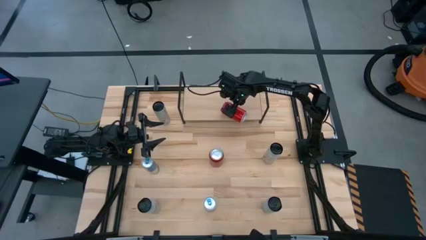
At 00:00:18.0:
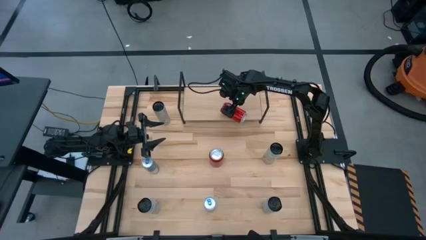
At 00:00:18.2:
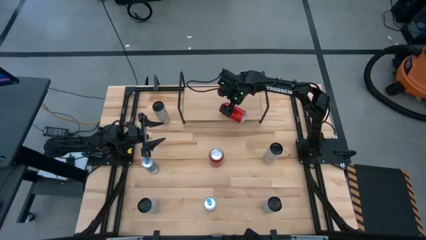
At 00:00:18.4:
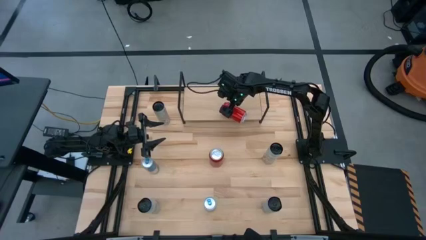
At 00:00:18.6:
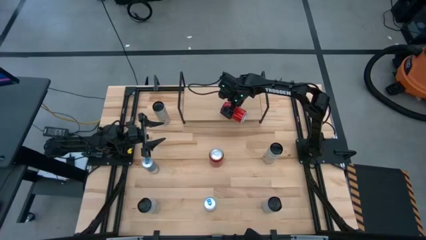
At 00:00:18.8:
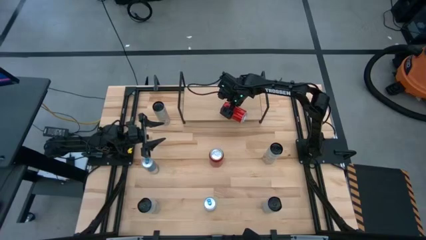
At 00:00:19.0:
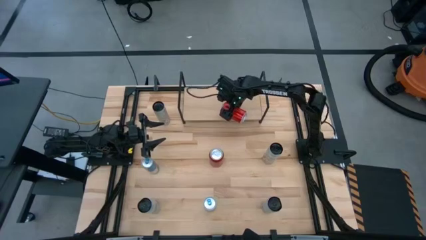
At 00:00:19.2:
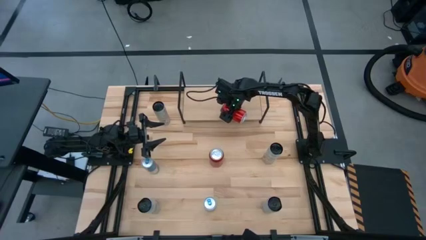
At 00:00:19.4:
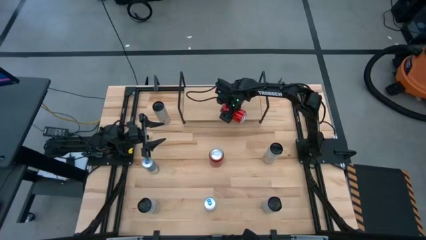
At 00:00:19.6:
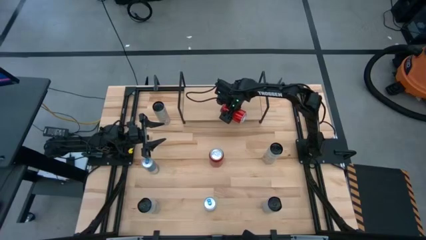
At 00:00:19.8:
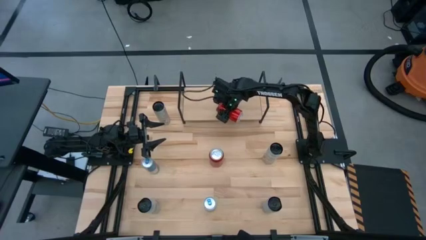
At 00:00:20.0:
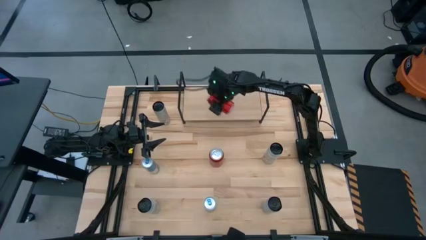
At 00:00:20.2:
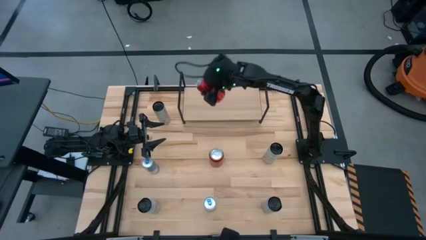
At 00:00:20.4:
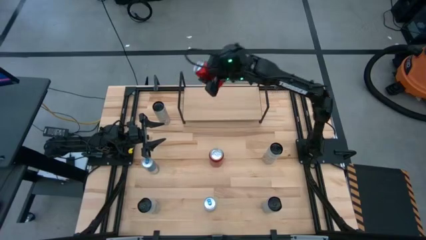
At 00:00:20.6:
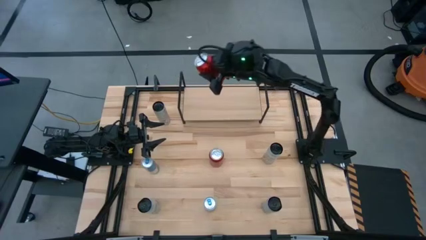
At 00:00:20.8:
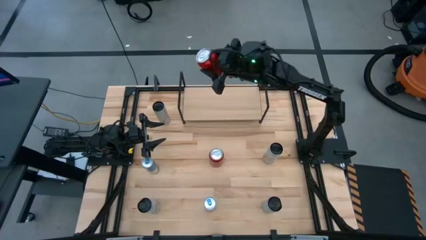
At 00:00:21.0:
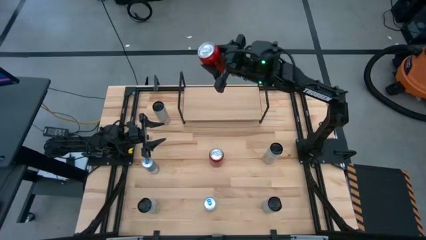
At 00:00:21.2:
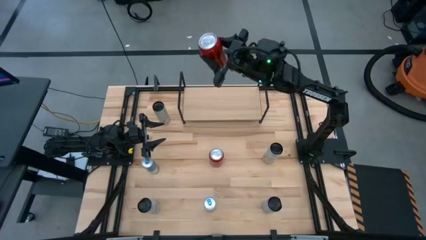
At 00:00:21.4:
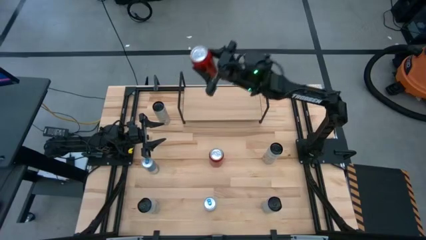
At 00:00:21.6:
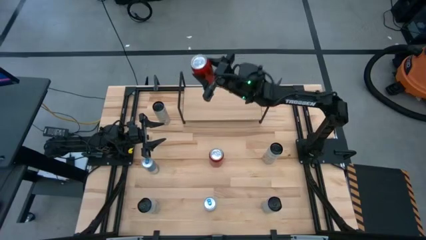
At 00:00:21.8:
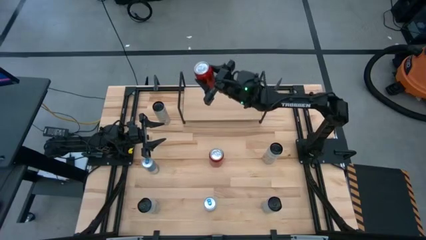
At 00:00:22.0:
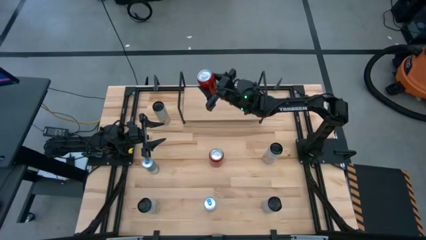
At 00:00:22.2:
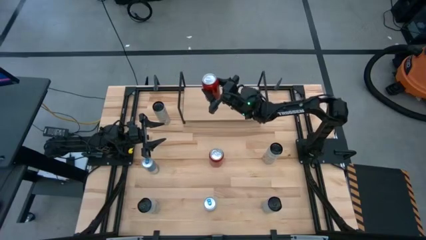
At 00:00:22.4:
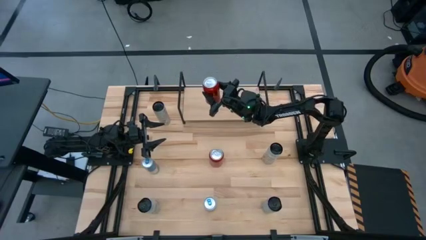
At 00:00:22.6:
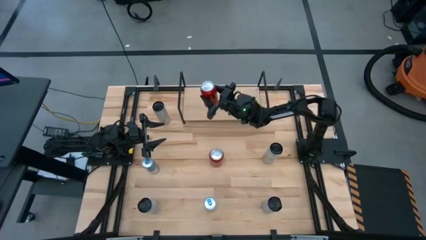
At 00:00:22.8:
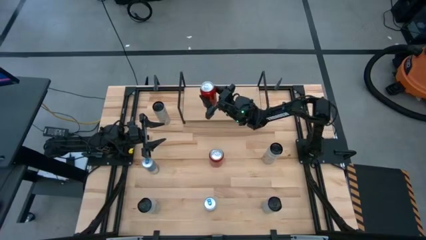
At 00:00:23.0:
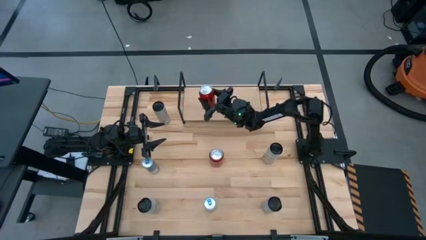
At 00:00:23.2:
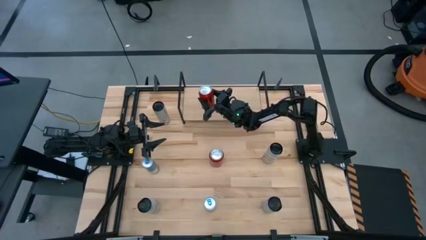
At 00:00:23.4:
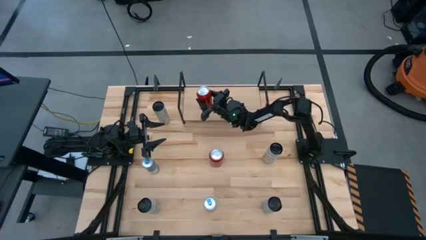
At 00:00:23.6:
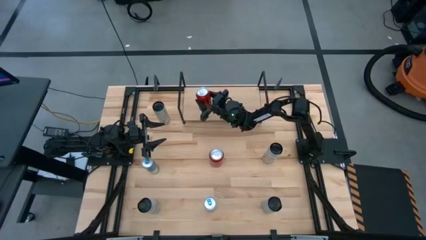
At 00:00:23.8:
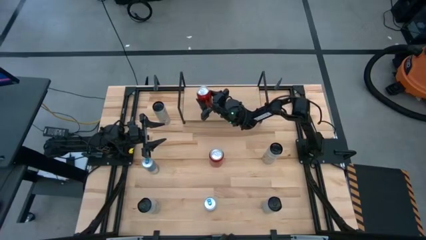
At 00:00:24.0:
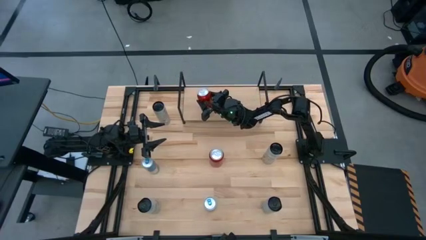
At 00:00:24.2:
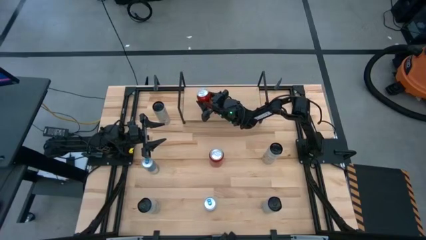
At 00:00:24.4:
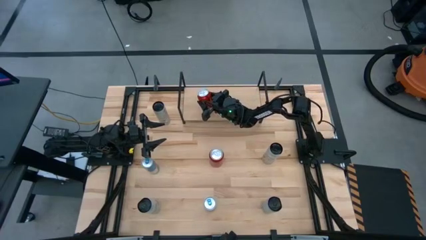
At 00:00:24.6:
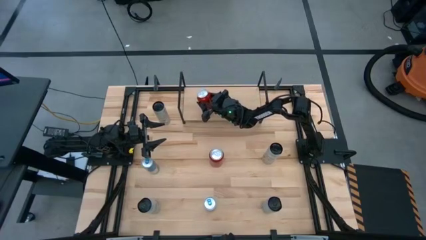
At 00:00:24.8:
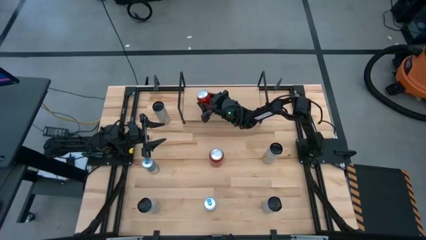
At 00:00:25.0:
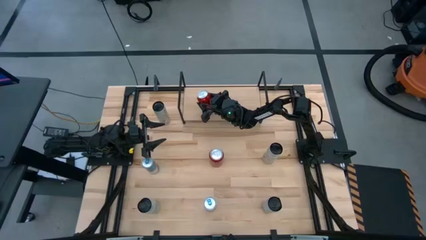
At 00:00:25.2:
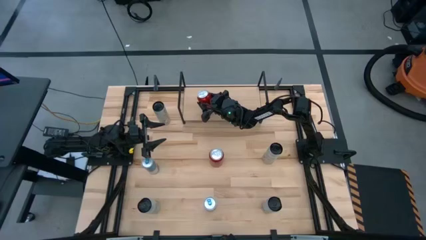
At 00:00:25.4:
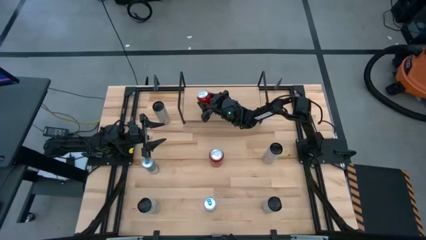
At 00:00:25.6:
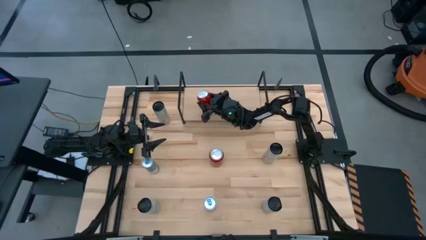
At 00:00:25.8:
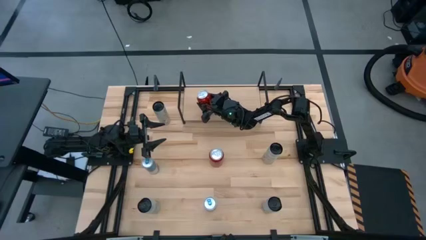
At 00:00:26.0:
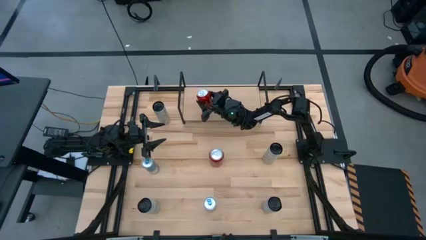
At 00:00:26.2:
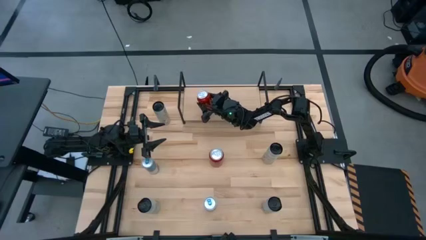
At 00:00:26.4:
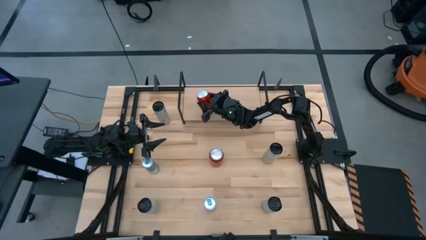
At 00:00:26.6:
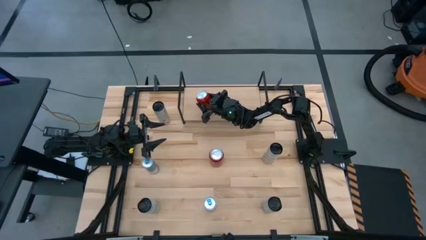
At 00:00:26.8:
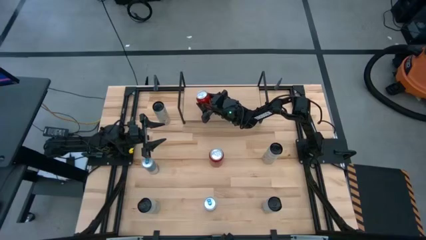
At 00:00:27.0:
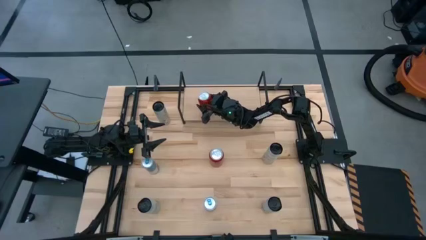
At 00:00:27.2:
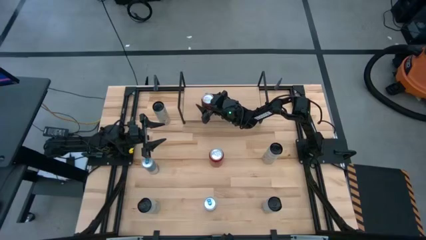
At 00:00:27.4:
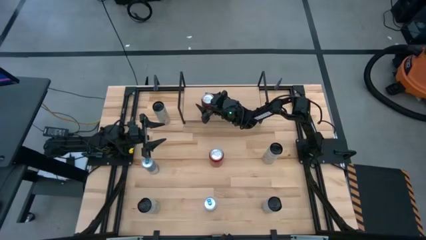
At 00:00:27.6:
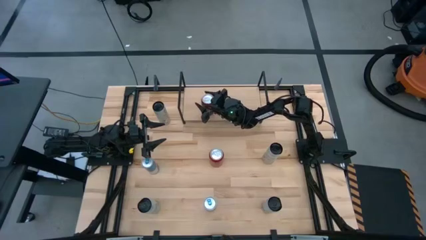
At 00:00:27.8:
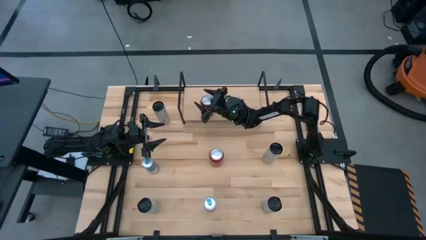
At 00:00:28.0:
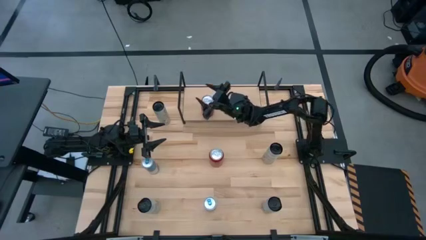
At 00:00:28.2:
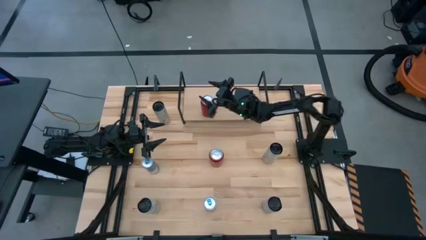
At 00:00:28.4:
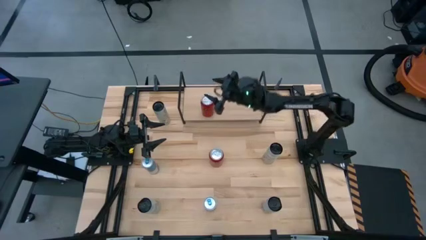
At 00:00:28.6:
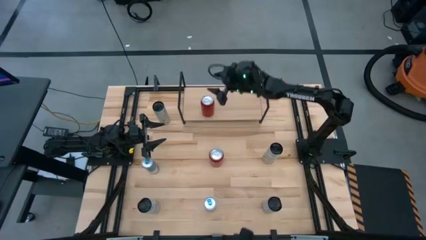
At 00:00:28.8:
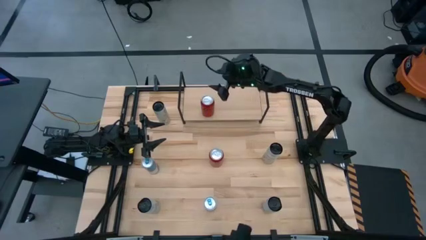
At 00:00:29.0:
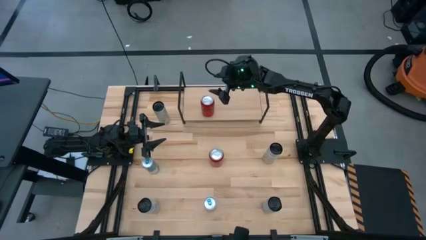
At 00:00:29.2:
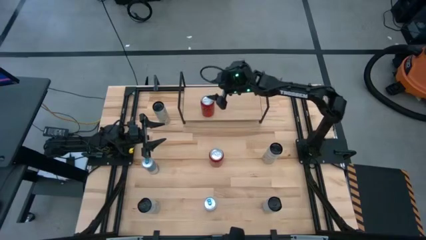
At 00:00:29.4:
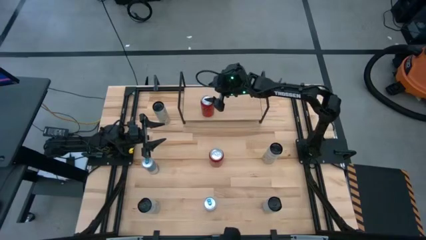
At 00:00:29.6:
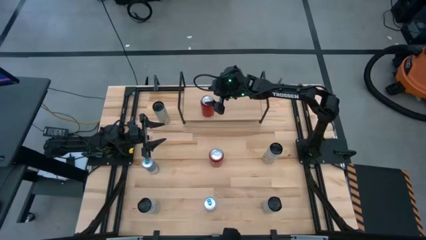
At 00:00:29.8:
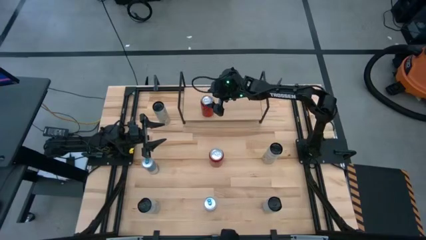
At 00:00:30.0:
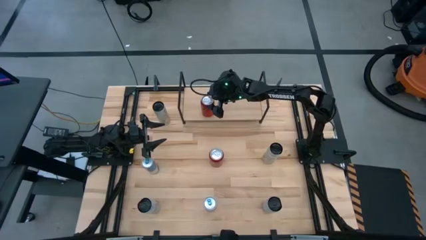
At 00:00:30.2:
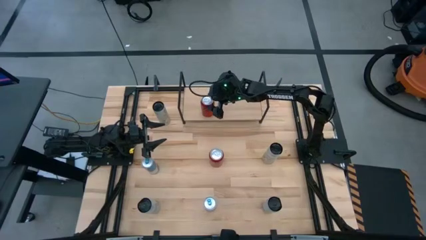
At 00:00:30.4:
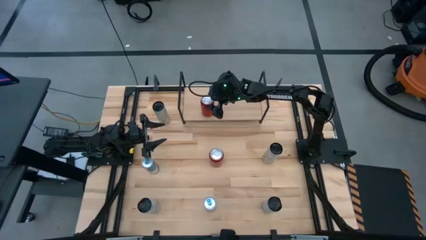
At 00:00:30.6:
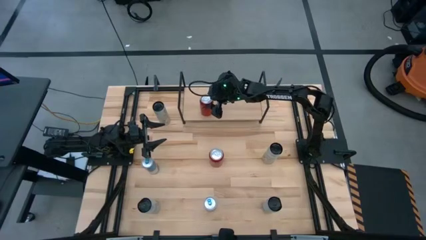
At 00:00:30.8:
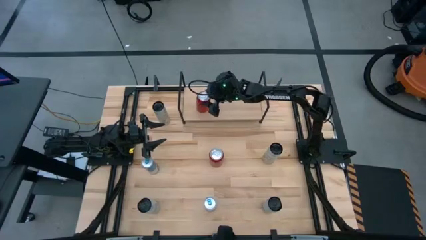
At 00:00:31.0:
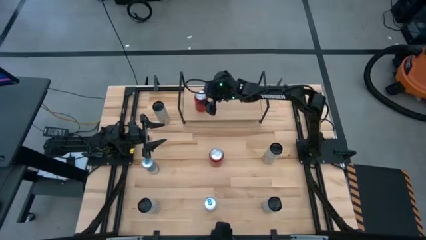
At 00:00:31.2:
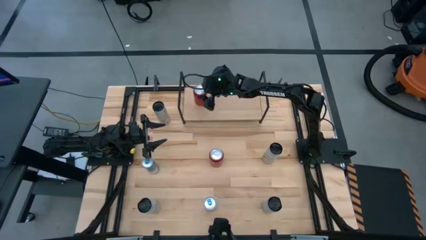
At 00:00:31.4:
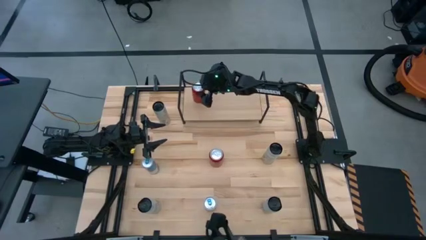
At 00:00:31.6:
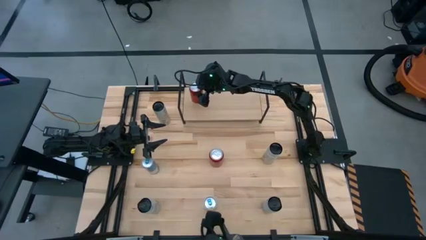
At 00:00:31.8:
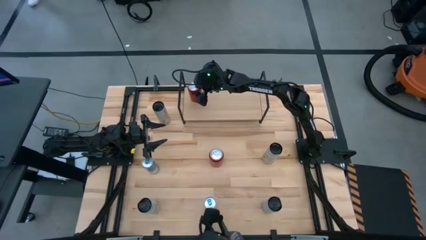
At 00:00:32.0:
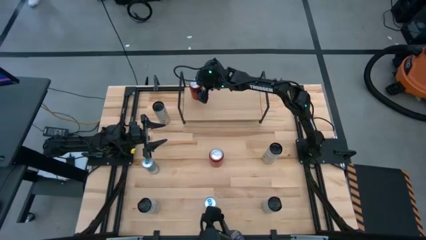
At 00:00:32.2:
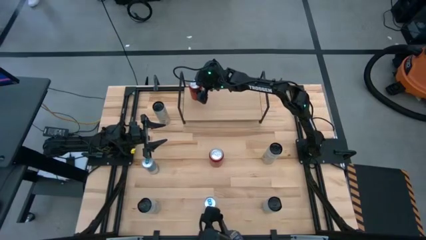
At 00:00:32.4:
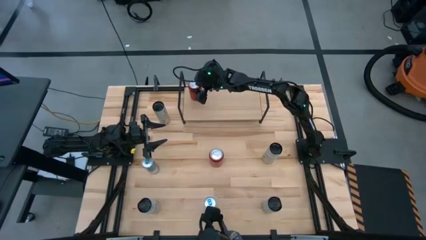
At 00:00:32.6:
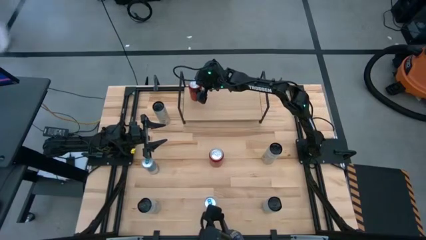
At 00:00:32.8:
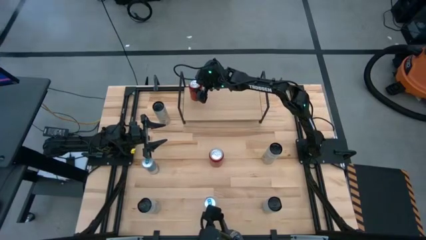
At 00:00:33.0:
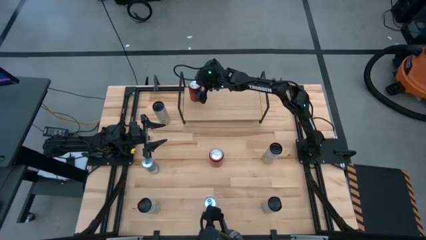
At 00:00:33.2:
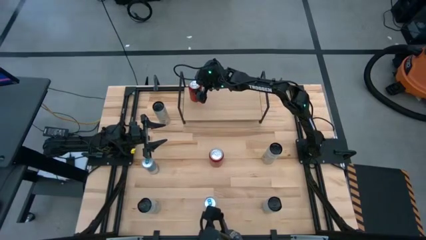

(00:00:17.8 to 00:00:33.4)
Task: Place canned beverage on shelf
Put the right red soda can on the shelf
